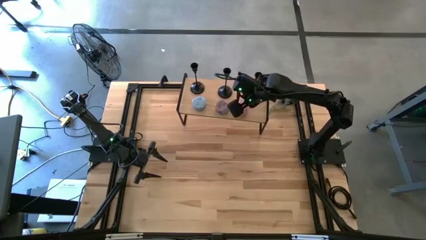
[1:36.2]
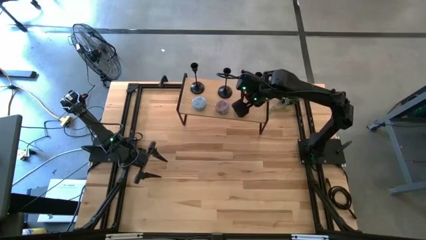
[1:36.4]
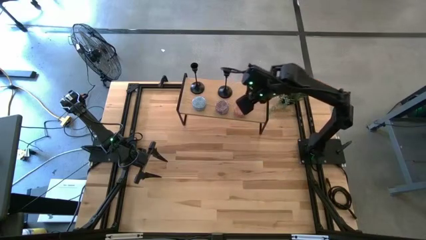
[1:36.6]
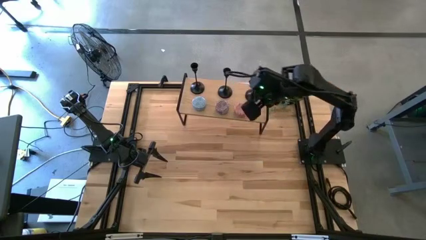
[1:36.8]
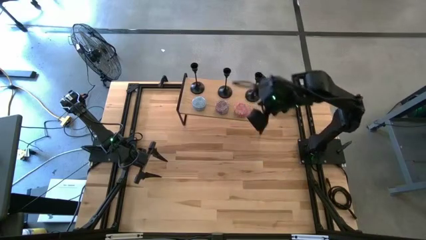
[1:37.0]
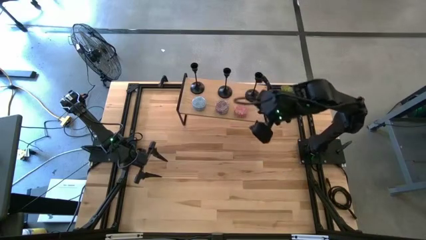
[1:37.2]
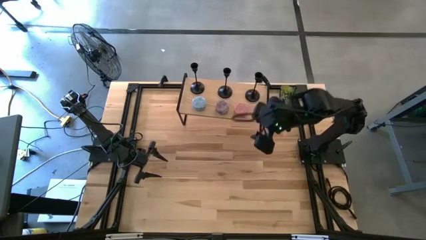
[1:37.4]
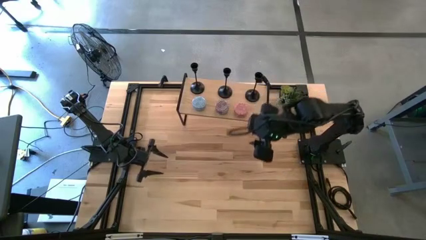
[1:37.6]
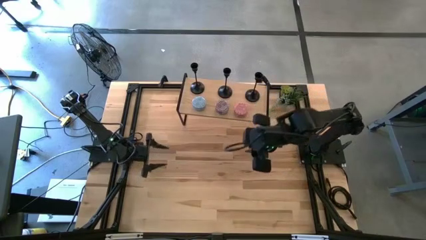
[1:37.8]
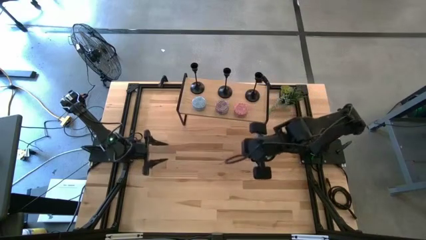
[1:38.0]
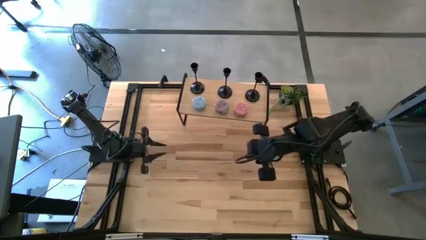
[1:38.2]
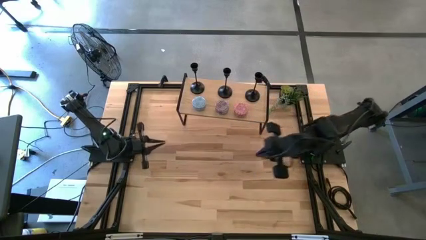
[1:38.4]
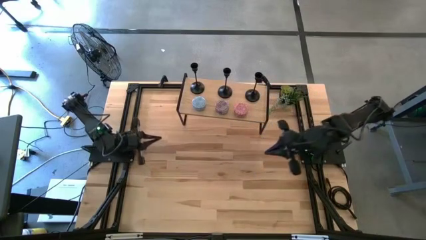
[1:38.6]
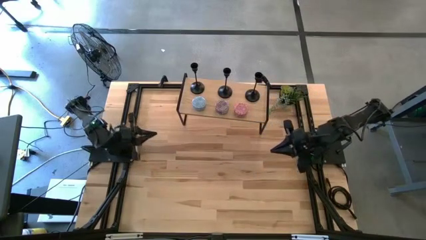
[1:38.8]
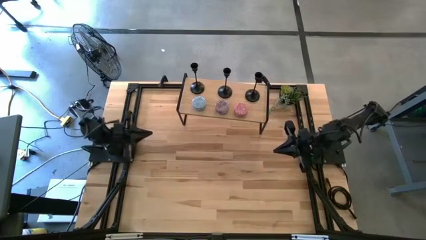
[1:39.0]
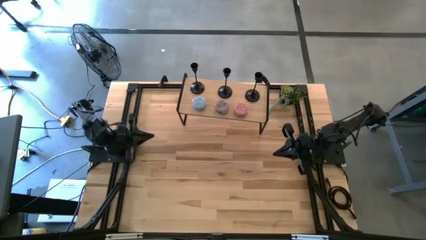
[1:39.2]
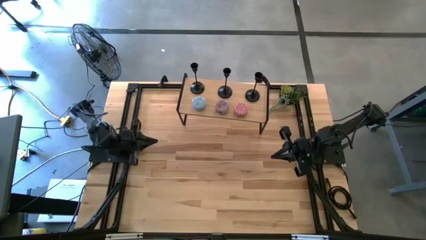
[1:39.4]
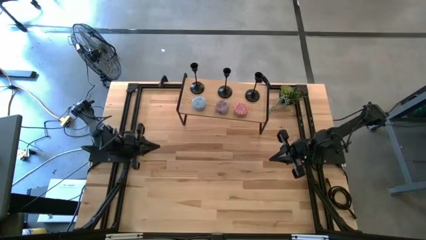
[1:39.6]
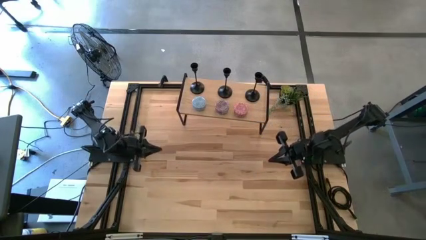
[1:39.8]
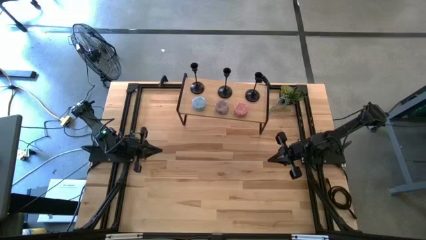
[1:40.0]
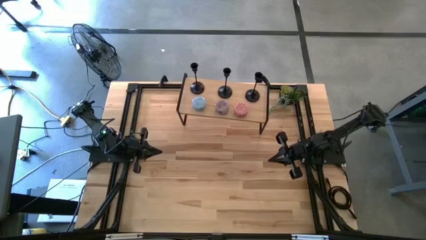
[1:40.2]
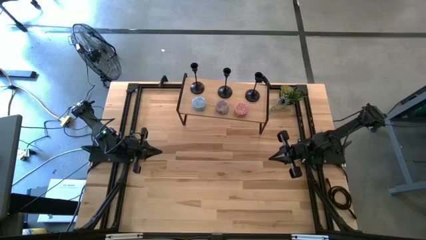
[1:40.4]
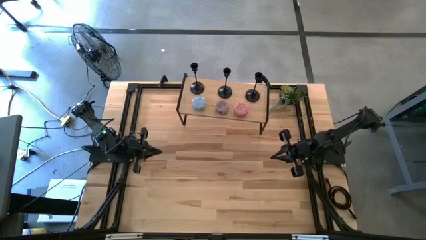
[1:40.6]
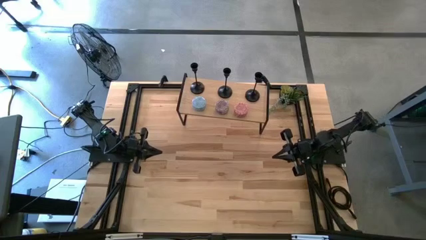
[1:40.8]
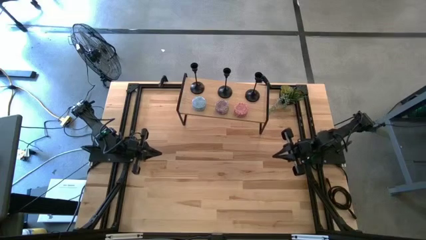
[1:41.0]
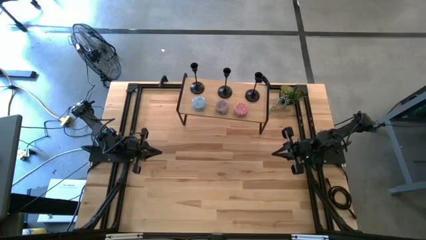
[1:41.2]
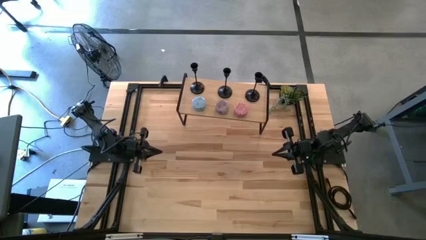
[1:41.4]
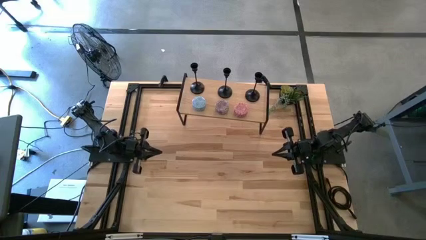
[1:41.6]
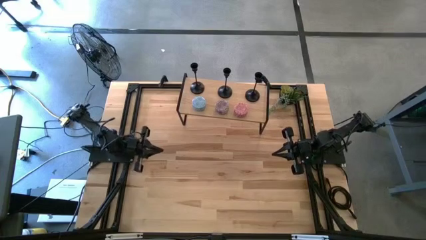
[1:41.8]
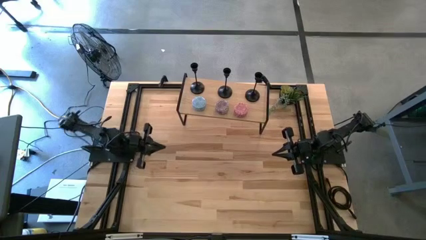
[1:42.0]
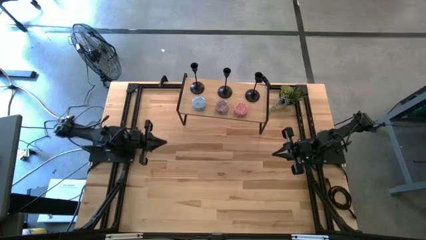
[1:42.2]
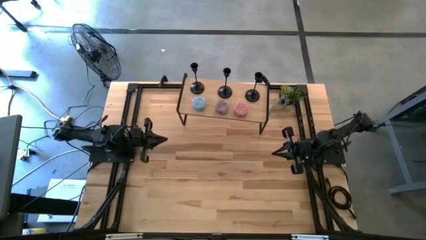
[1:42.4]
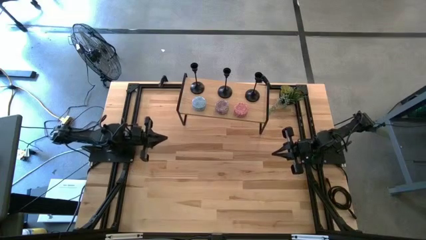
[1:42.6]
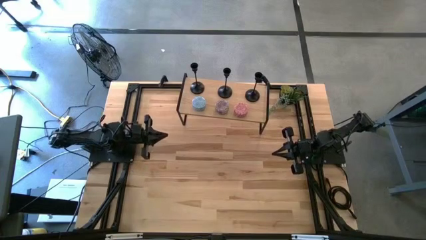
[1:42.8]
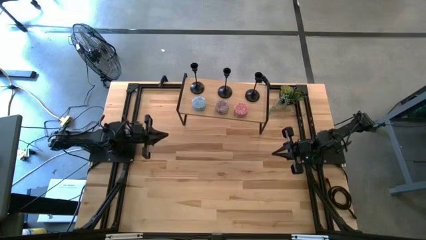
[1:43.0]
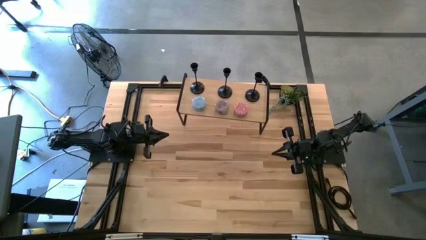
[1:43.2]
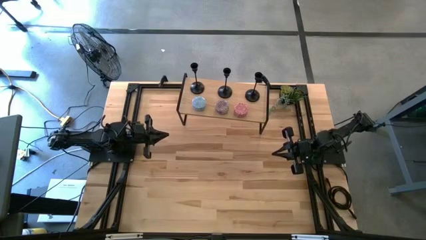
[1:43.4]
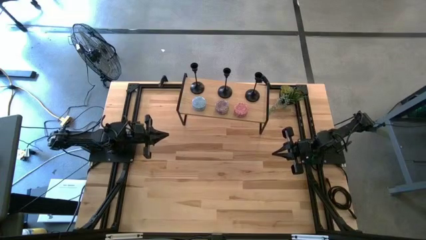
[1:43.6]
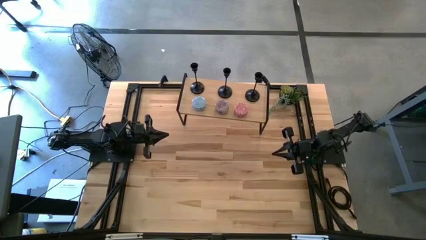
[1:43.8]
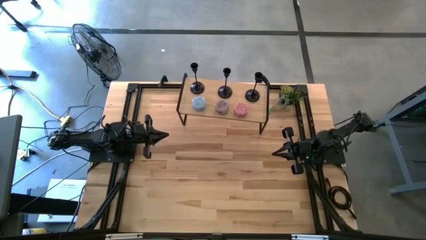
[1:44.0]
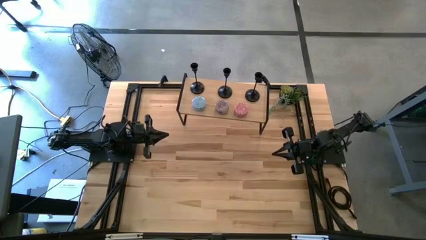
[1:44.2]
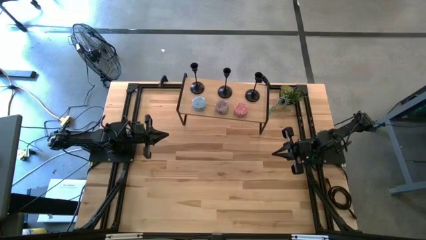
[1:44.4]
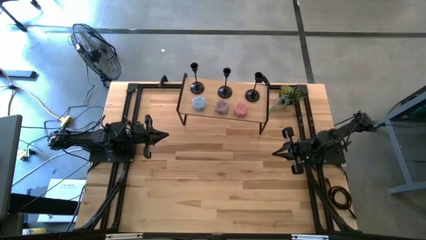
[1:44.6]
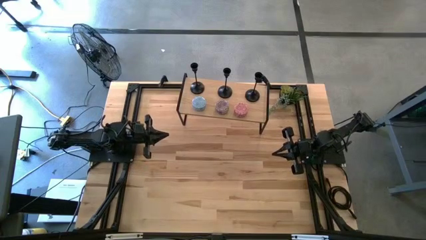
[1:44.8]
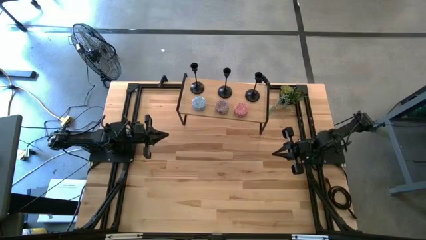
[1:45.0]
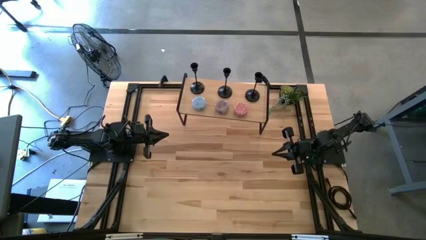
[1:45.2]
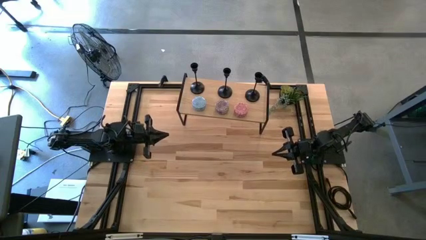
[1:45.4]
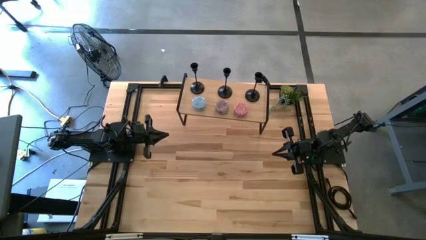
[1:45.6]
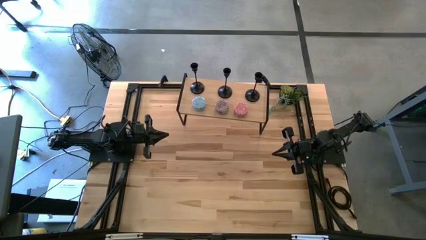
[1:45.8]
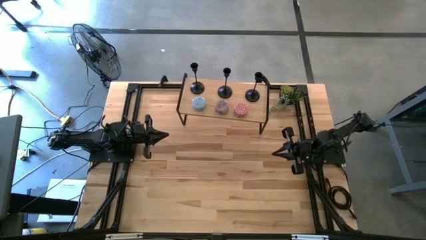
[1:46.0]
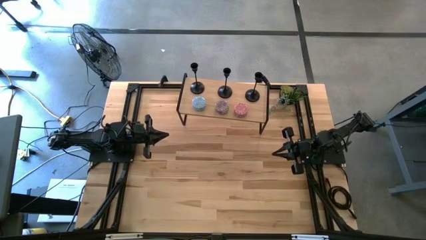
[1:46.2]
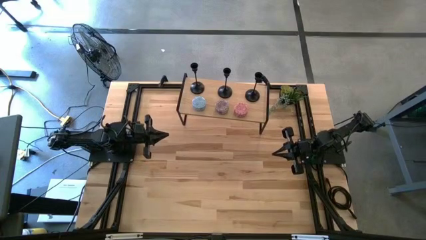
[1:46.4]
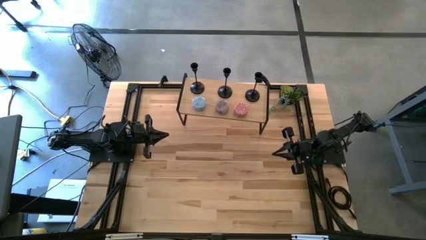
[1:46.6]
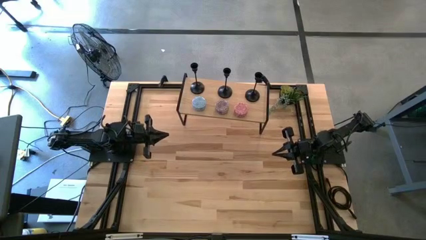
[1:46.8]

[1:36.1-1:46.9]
Task: Pick & Place candle stick holders
Return to Home Position
